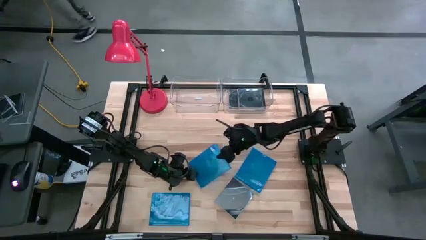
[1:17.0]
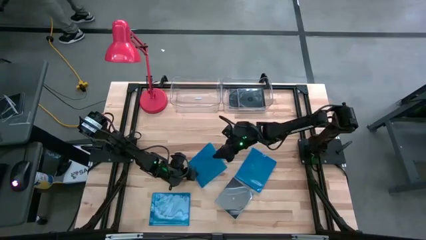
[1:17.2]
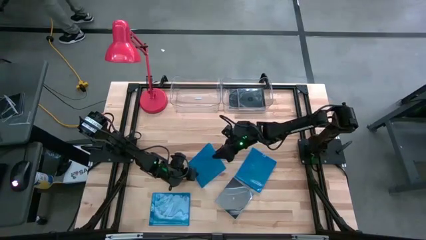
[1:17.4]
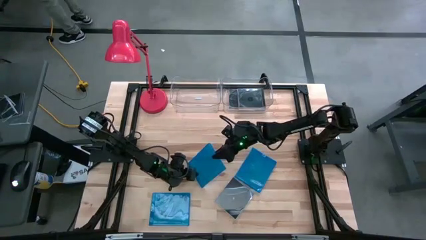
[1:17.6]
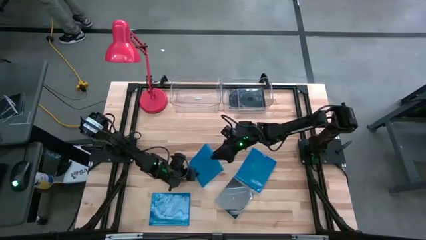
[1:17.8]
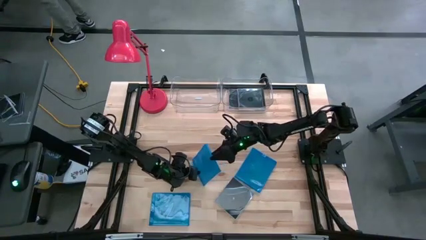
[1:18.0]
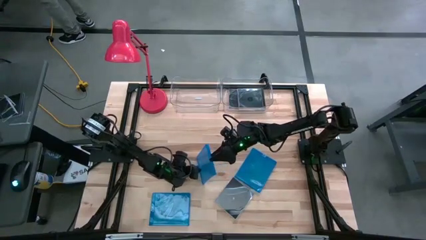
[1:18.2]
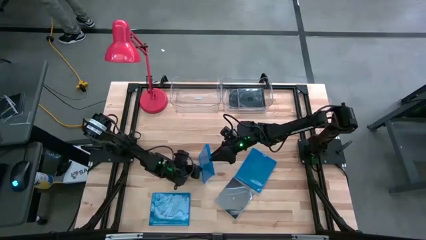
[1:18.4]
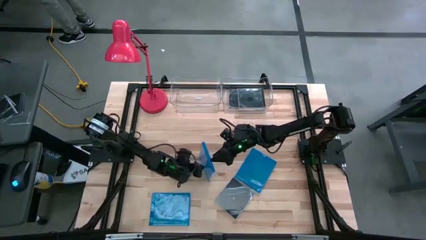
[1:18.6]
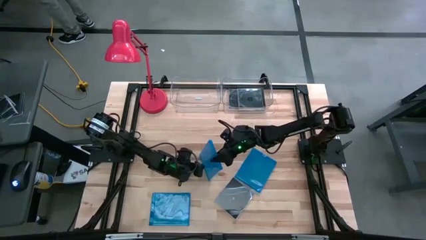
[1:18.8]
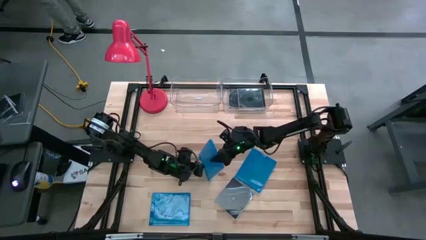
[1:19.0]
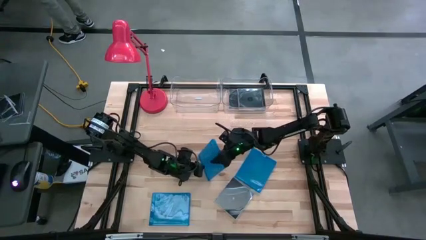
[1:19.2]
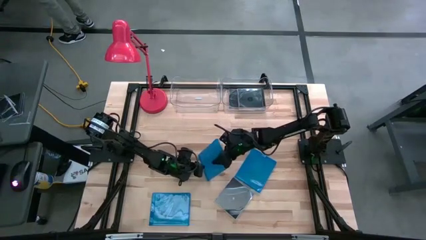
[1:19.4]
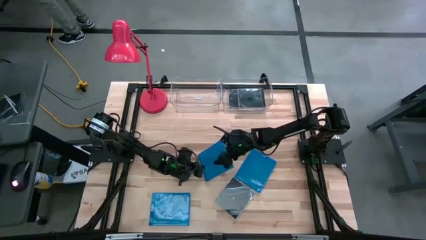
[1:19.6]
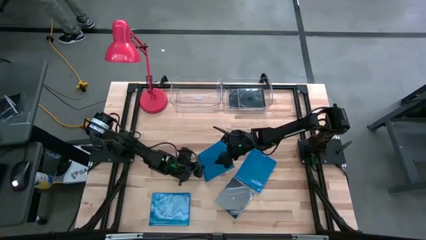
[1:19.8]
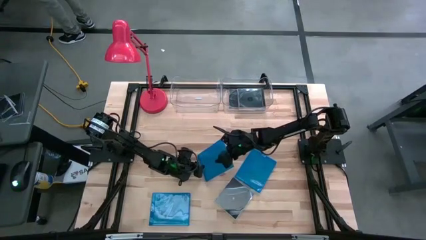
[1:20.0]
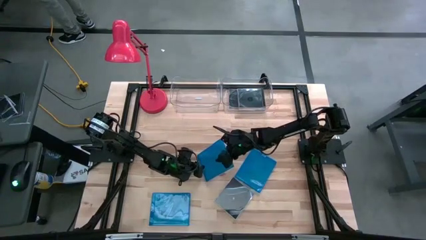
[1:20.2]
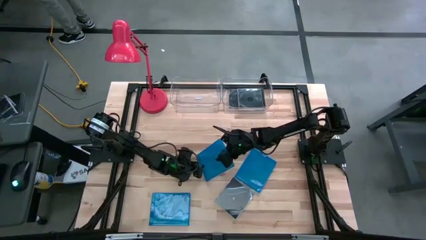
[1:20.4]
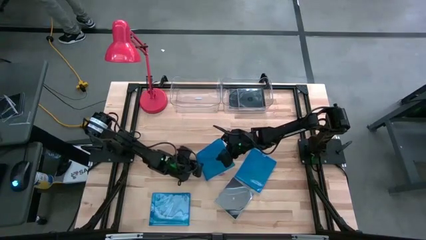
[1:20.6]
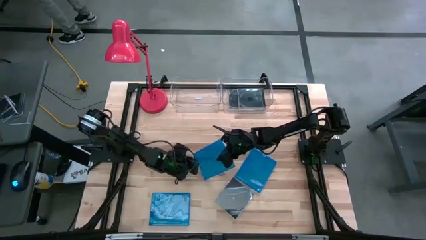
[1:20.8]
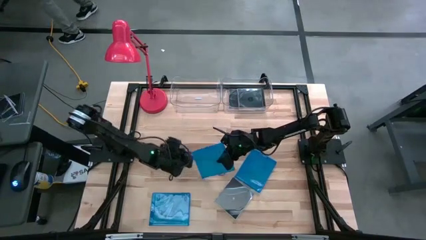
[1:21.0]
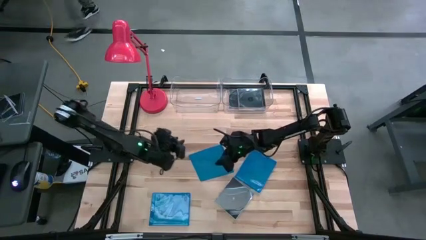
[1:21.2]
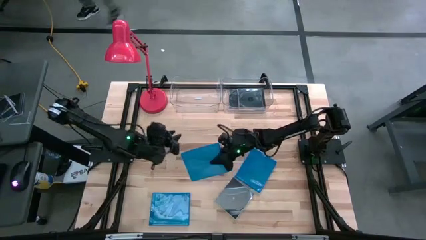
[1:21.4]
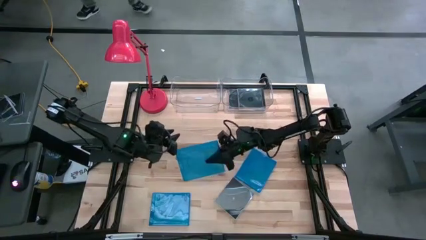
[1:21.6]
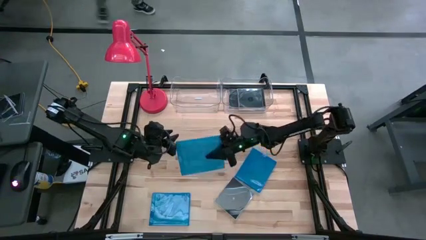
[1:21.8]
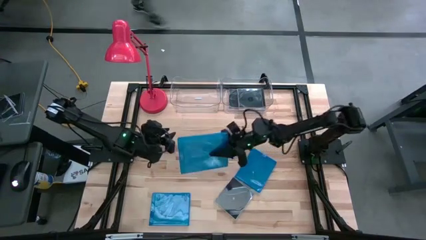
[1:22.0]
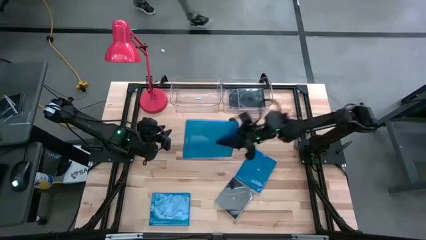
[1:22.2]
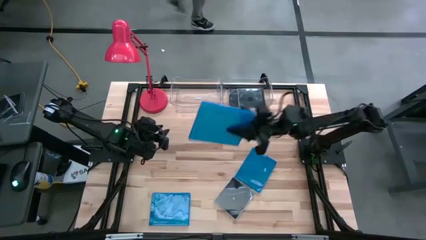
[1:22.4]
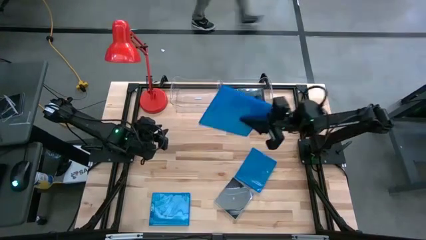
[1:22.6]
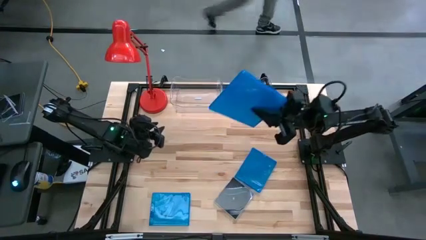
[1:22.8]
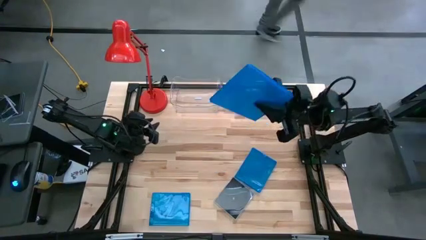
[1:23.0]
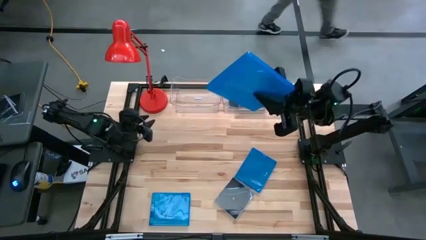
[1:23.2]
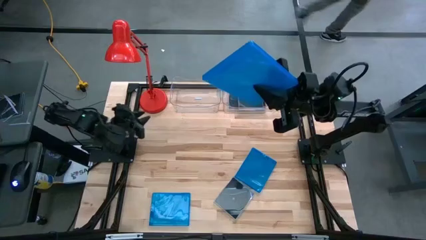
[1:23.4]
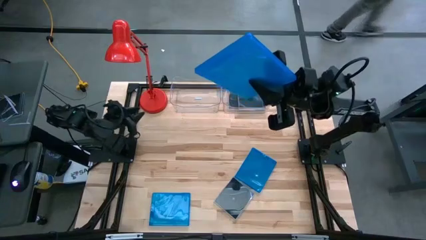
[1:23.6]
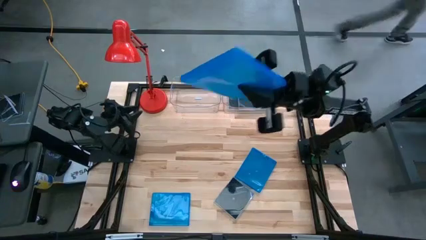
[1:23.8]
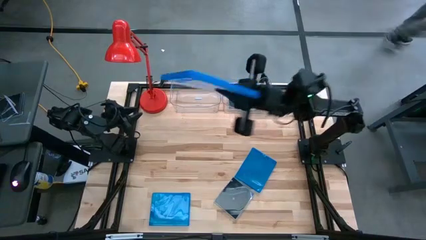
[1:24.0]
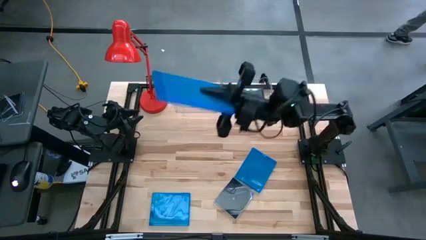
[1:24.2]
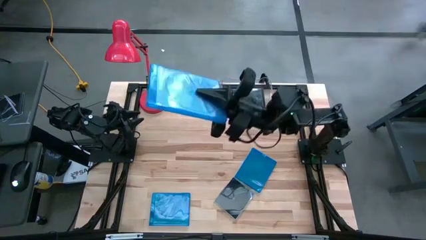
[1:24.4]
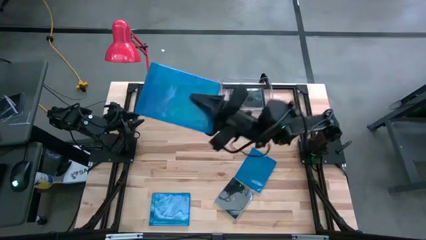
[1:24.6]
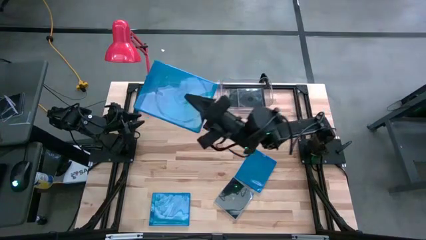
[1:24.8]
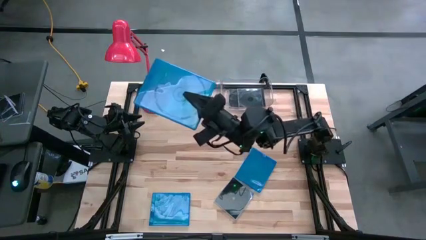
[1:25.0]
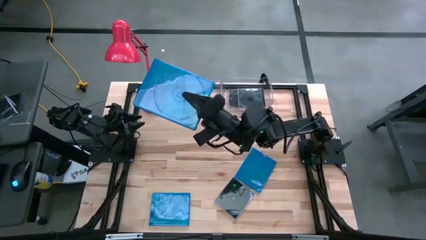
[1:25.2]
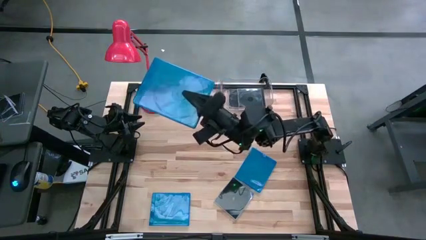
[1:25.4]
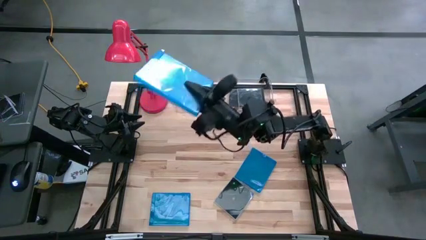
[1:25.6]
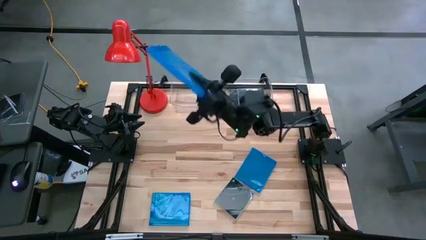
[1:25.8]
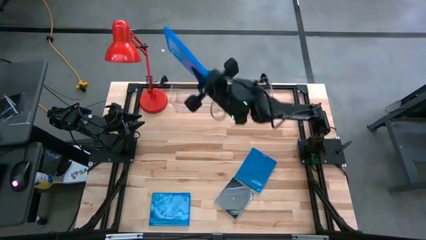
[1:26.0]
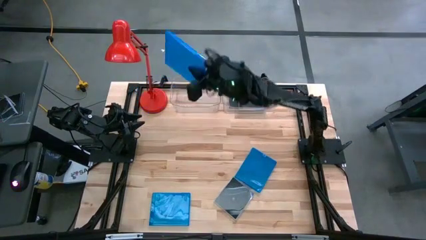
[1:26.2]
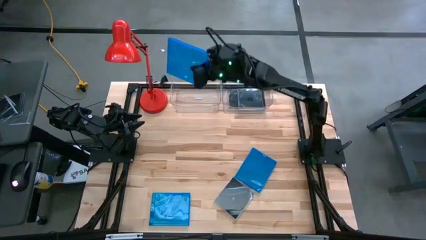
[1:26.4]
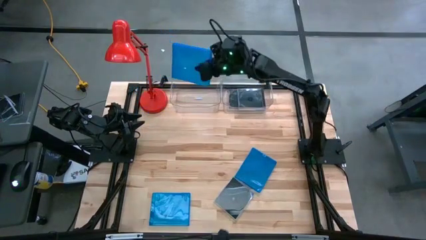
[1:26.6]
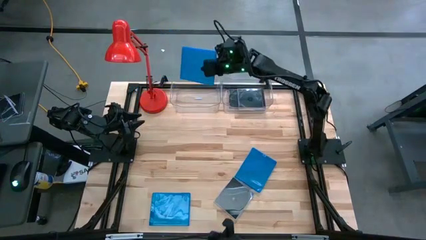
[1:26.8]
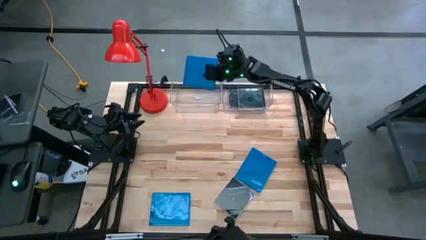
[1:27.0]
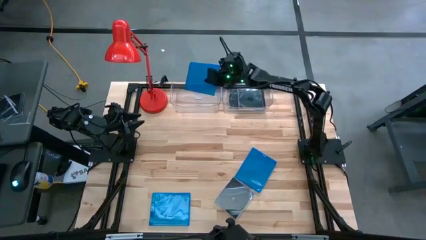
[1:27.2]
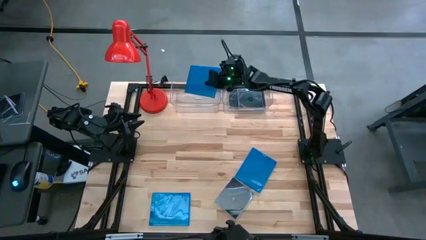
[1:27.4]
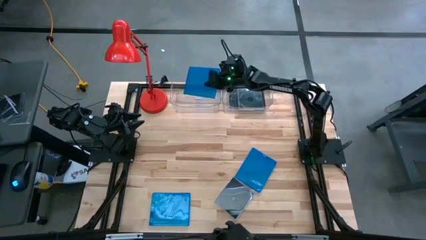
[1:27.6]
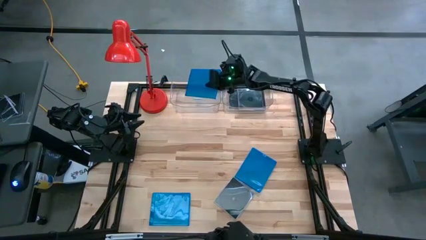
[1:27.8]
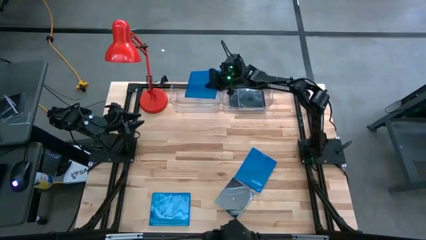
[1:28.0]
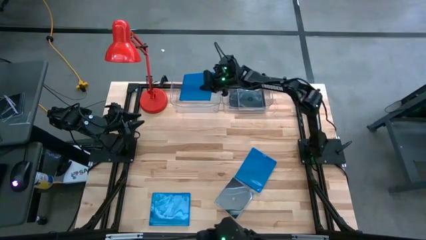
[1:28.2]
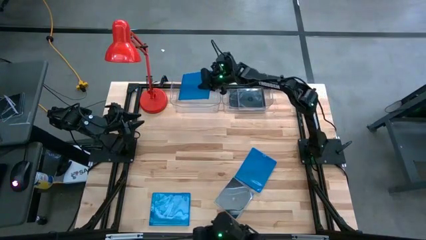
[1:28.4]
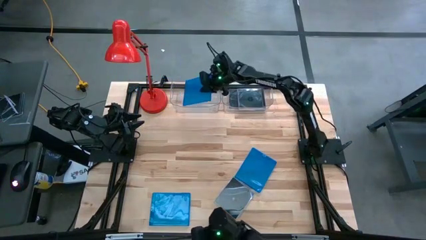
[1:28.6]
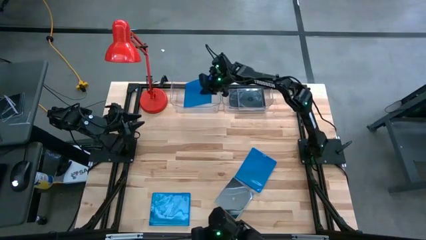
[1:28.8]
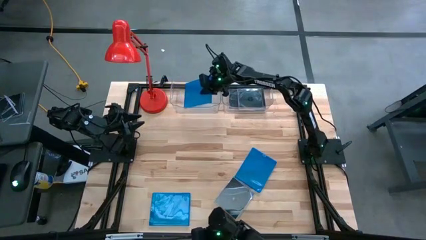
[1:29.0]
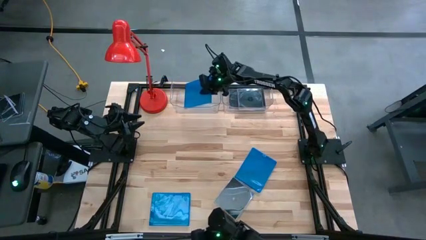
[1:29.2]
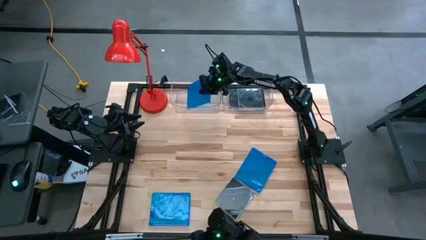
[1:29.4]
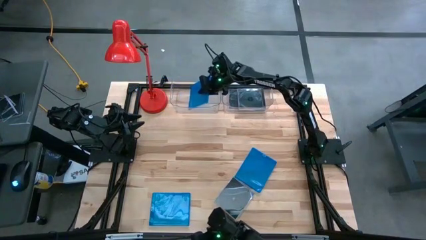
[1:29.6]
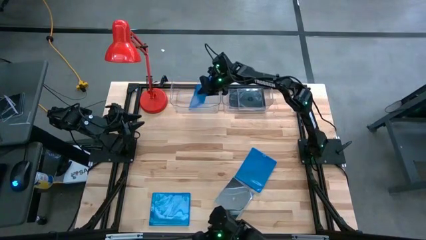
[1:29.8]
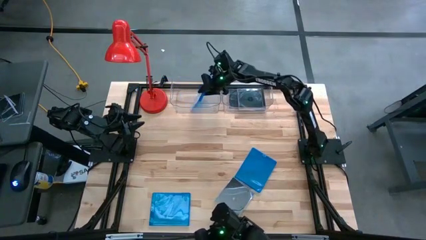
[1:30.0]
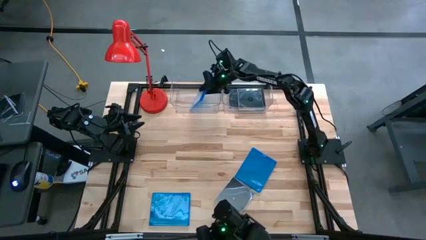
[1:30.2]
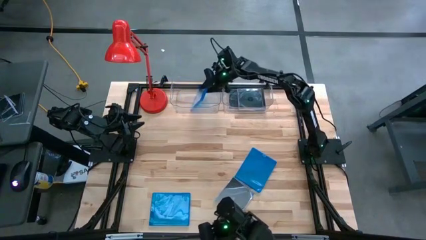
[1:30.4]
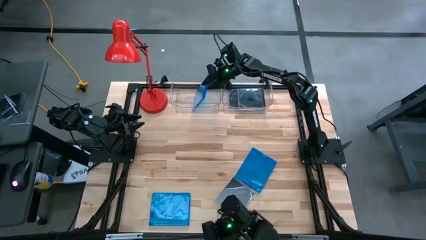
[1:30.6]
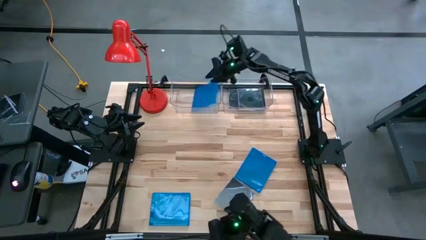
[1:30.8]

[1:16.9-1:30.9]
Task: Pick & place jewel cases by type
Put the top left blue cd case into the left transparent bin
